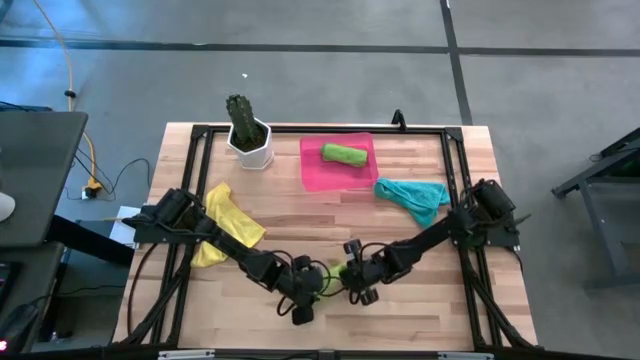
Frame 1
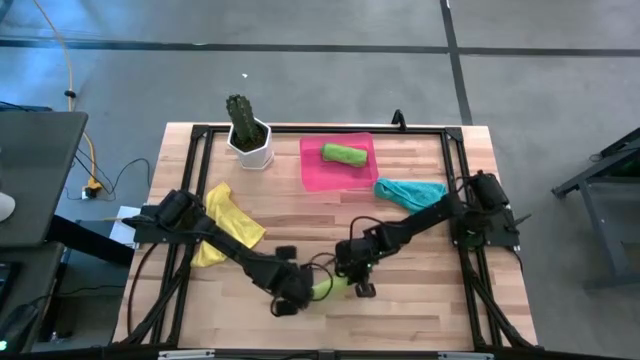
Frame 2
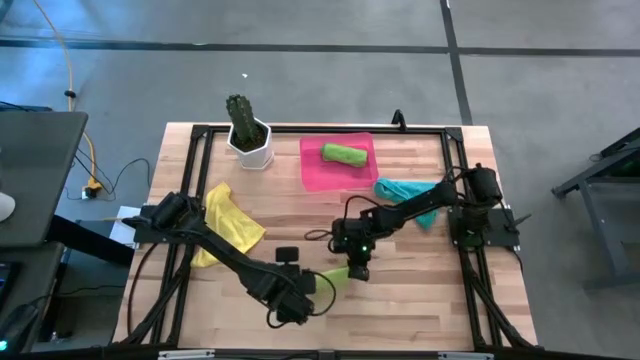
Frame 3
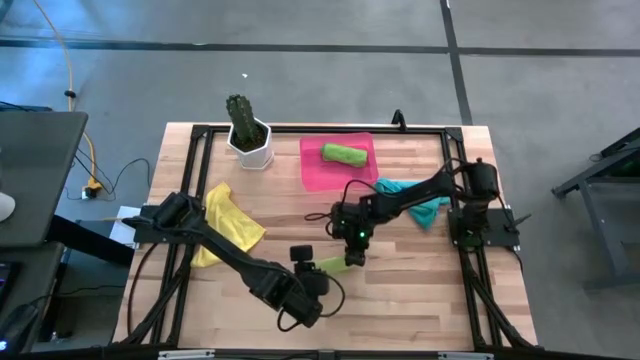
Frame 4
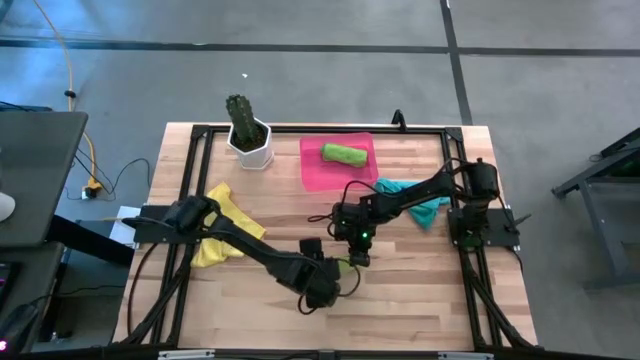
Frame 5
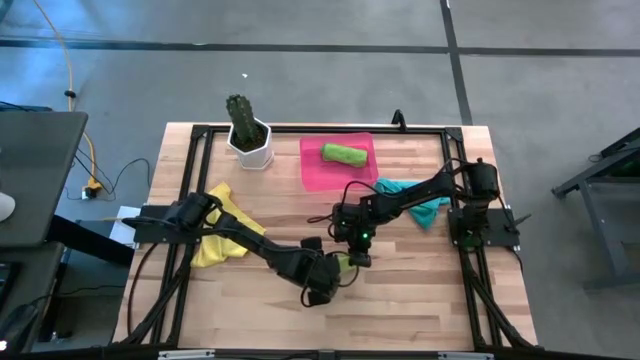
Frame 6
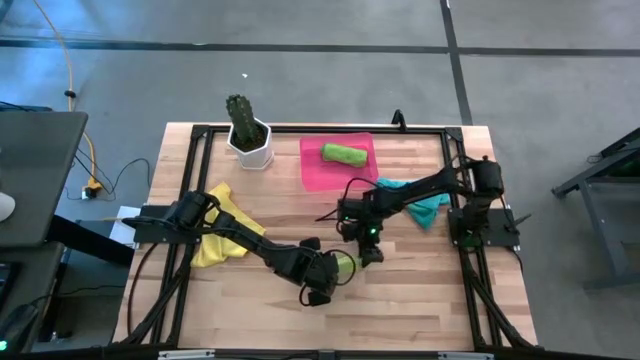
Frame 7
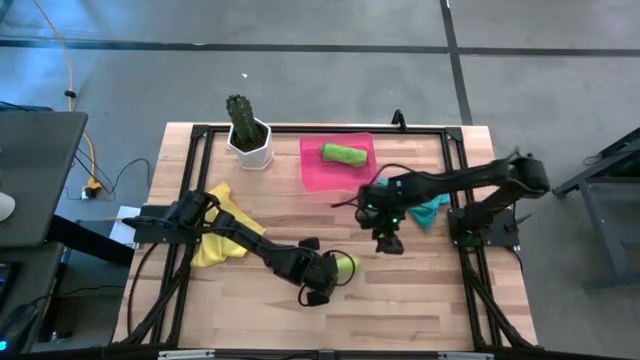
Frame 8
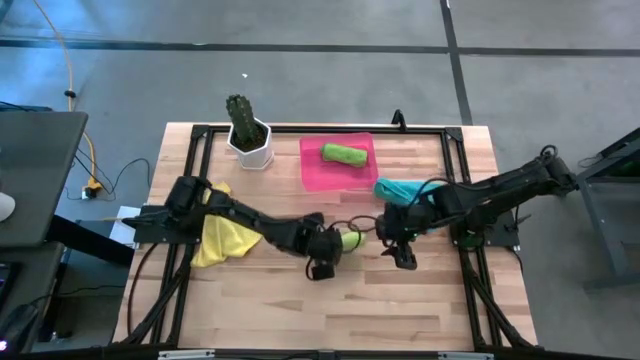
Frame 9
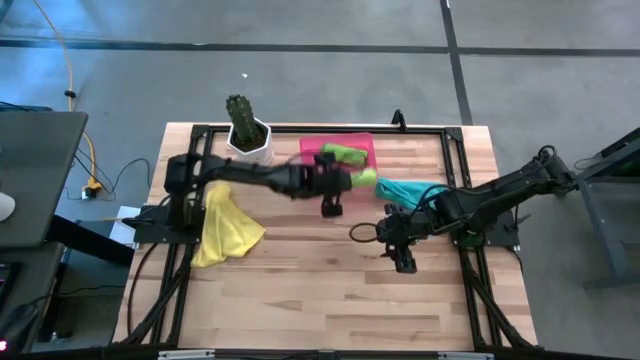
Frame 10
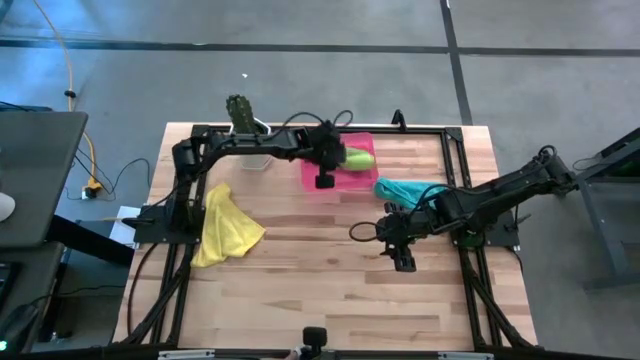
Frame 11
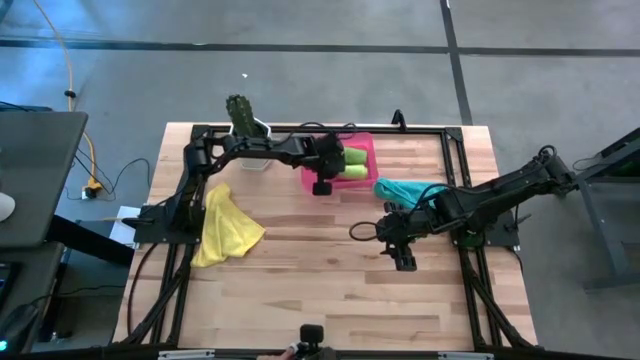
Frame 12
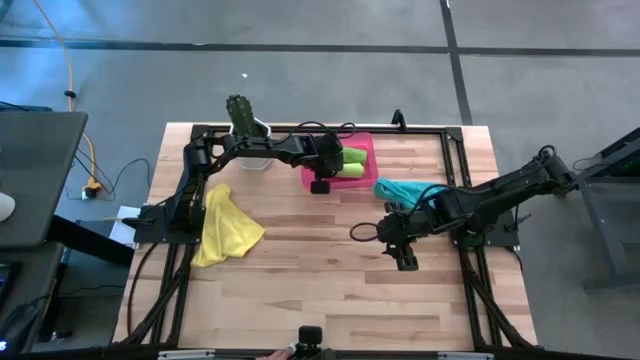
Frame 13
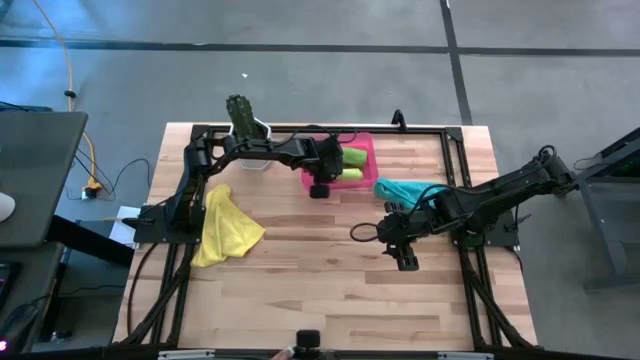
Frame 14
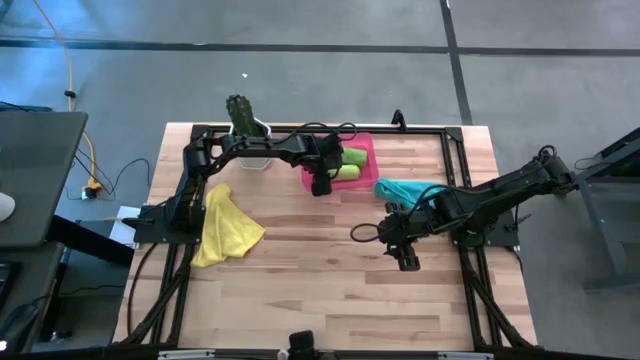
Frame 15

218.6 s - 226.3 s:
Task: Roll microfiber towels into tight, uniform cylinder then place into a basket
Put the rolled light green microfiber cloth into the pink bin

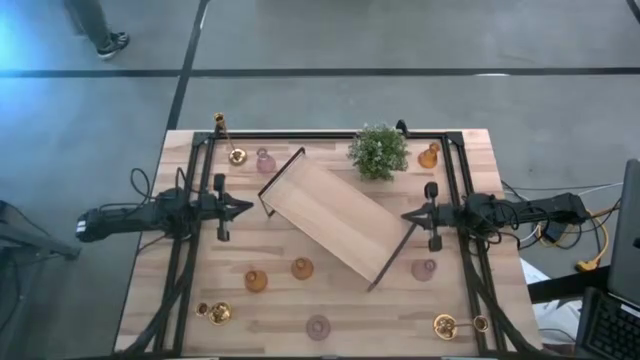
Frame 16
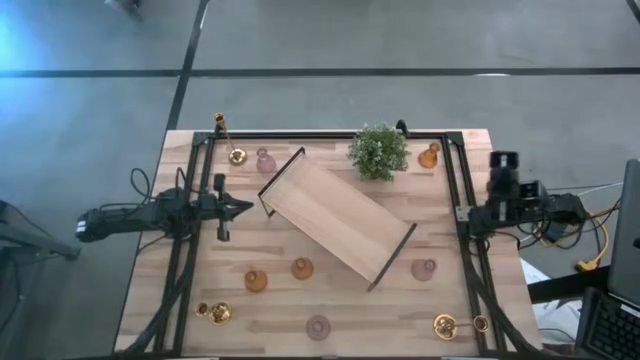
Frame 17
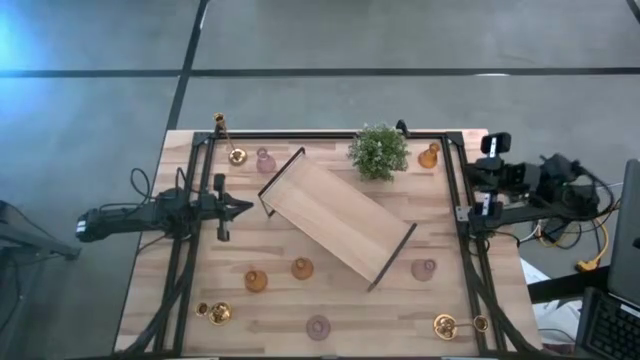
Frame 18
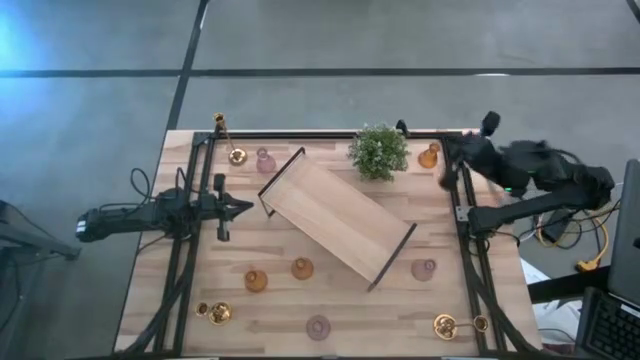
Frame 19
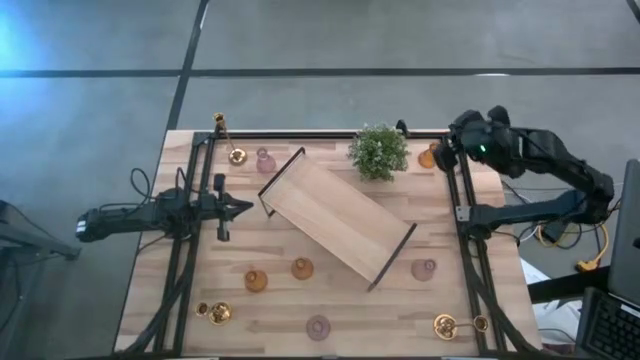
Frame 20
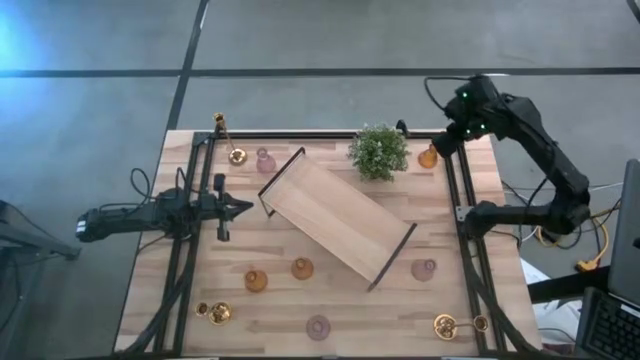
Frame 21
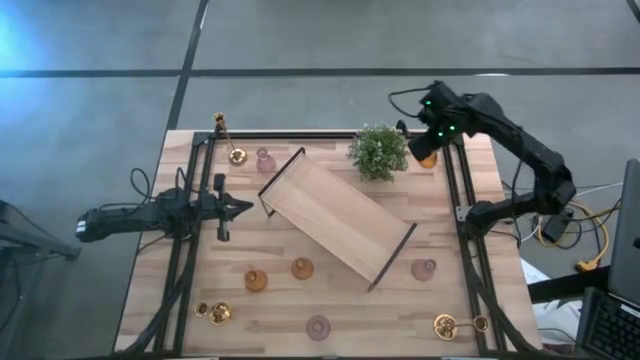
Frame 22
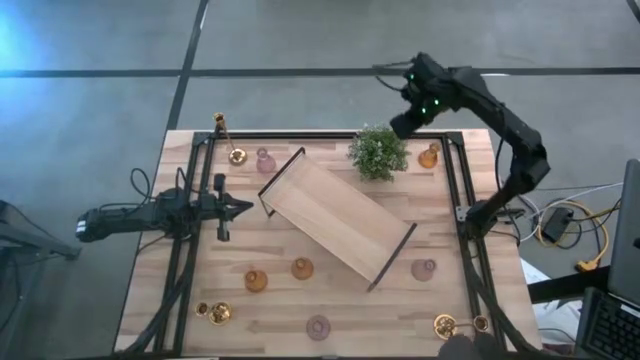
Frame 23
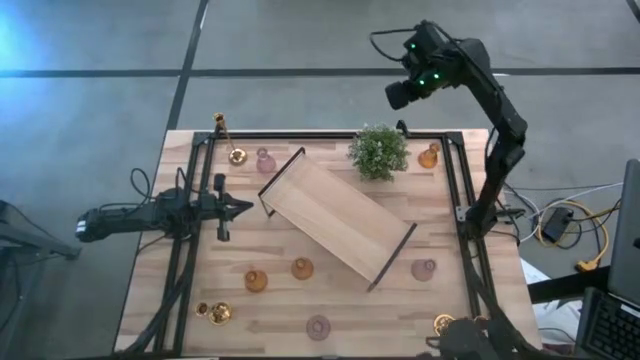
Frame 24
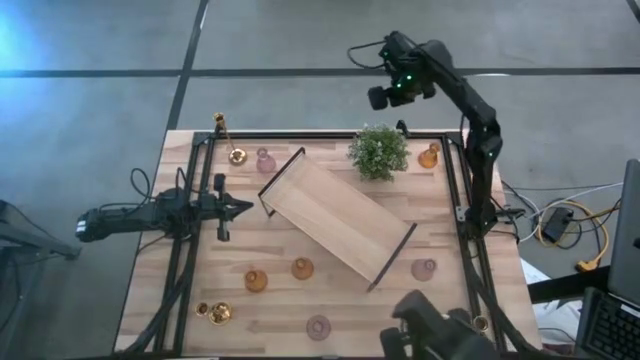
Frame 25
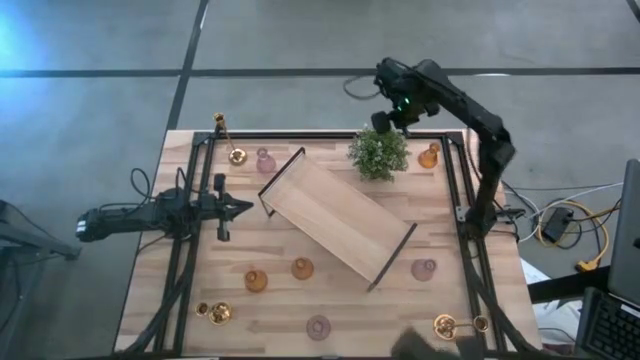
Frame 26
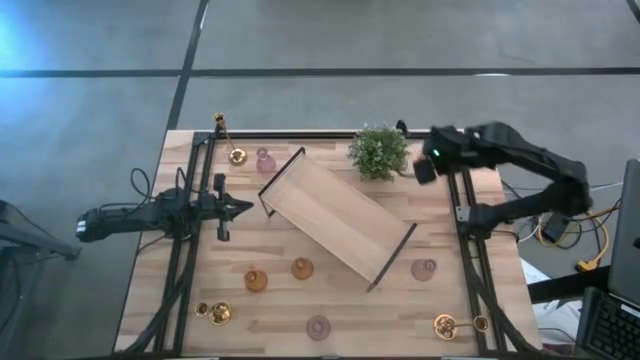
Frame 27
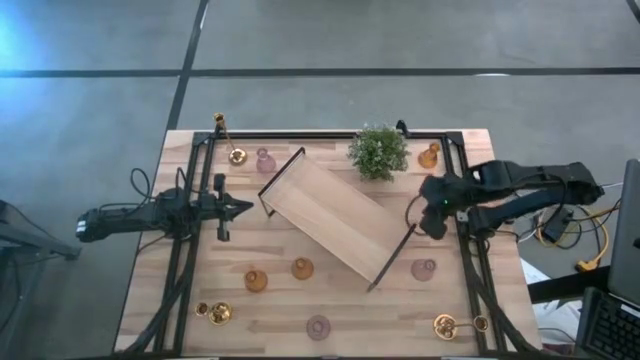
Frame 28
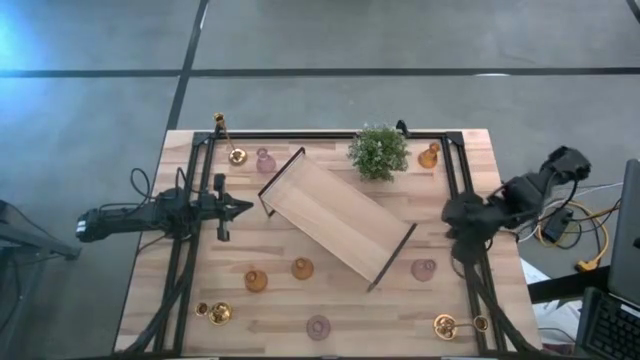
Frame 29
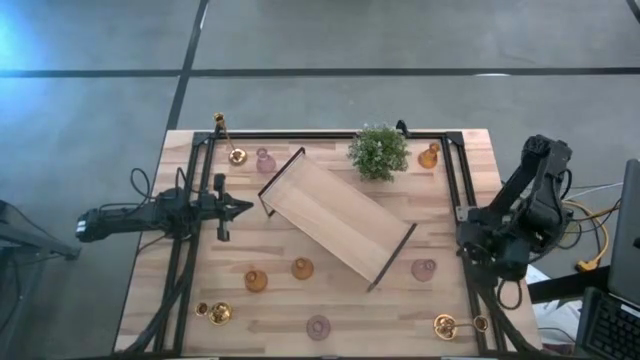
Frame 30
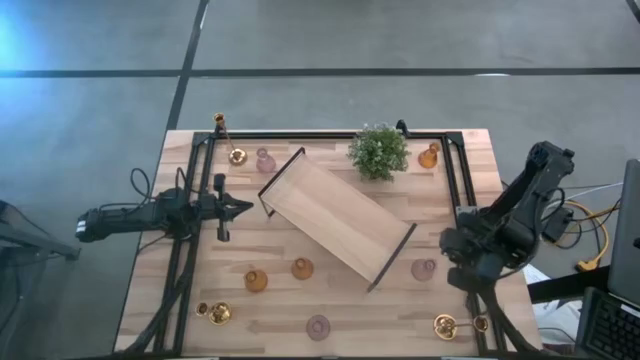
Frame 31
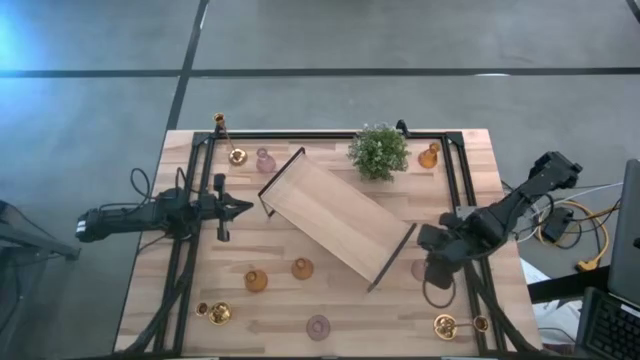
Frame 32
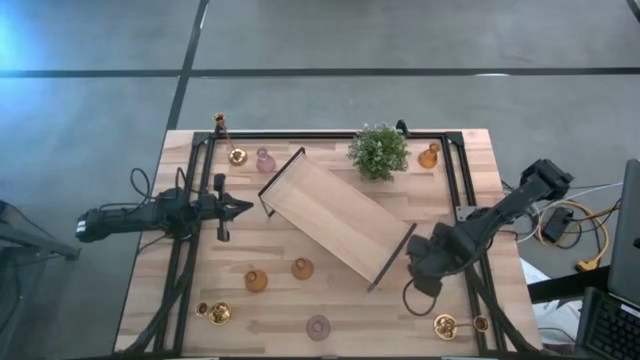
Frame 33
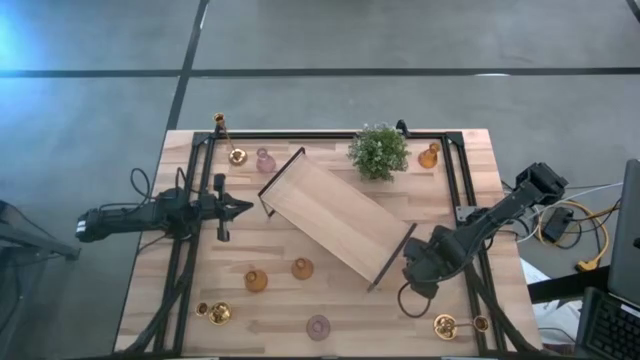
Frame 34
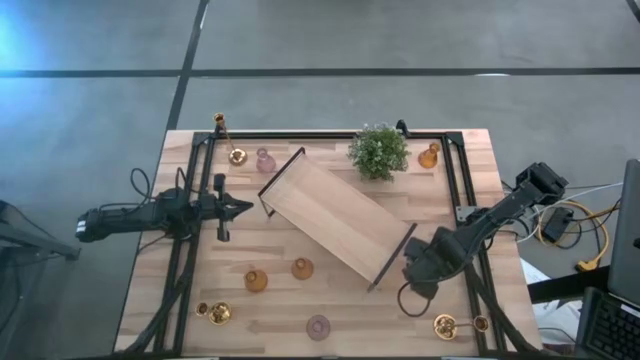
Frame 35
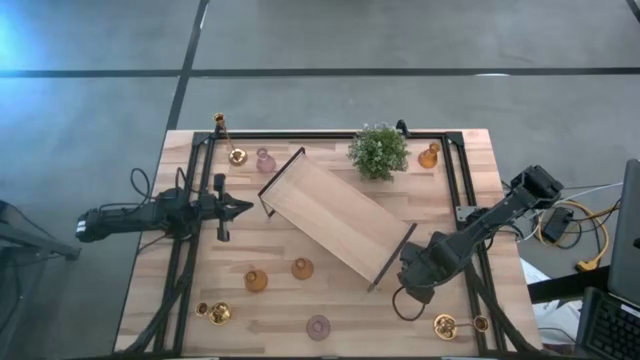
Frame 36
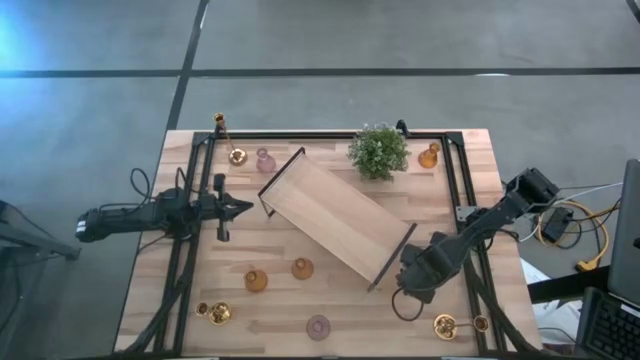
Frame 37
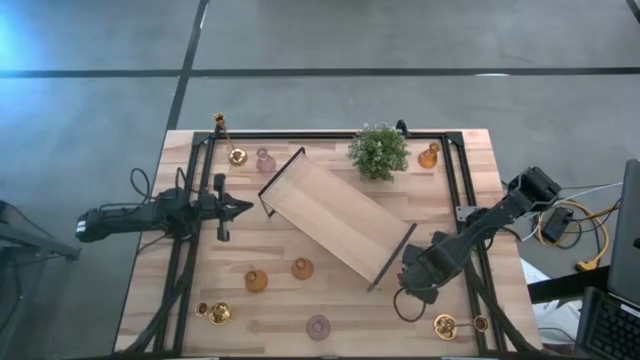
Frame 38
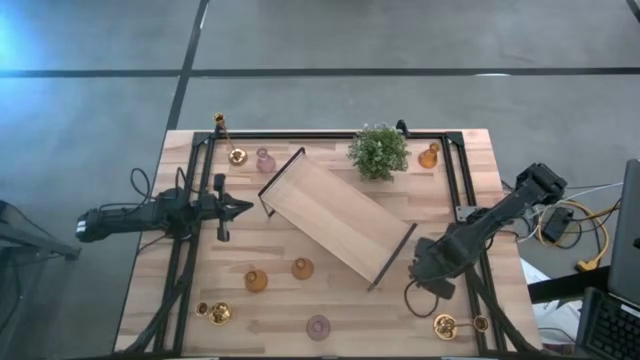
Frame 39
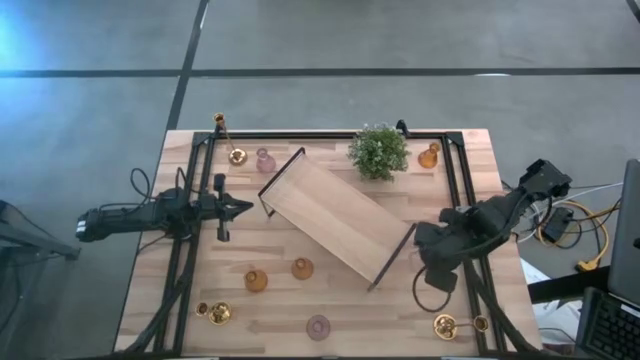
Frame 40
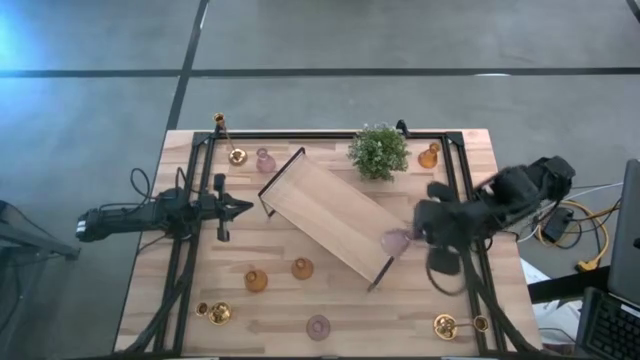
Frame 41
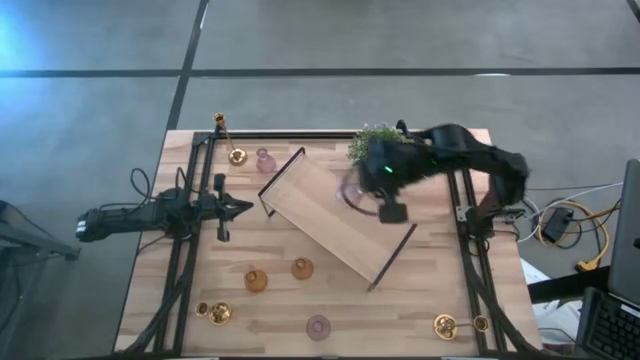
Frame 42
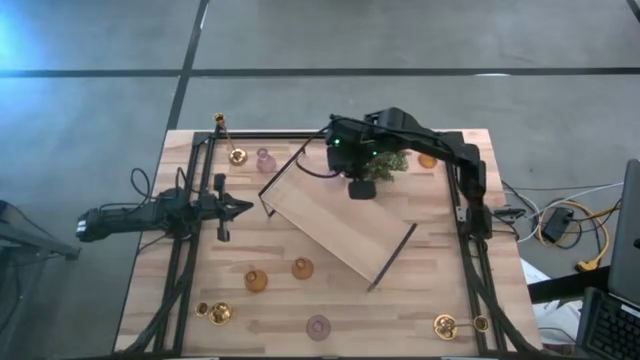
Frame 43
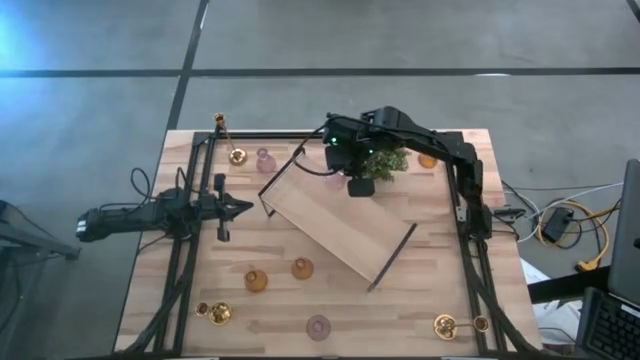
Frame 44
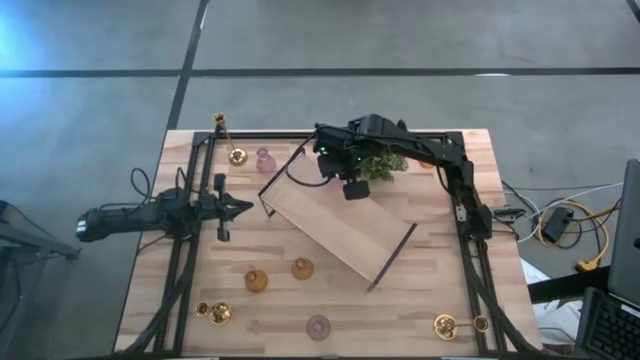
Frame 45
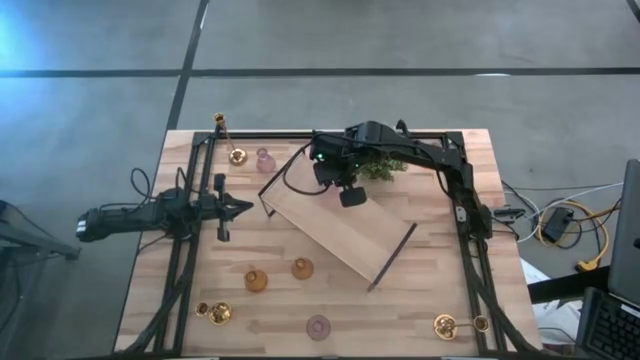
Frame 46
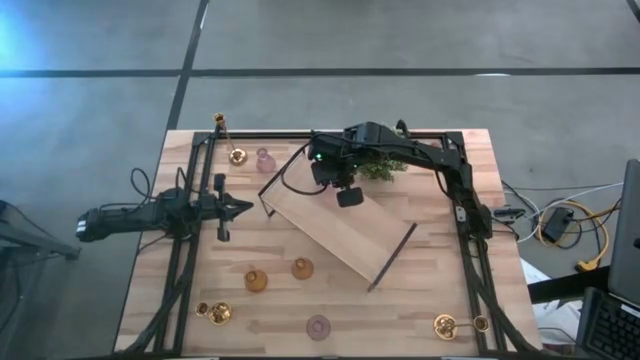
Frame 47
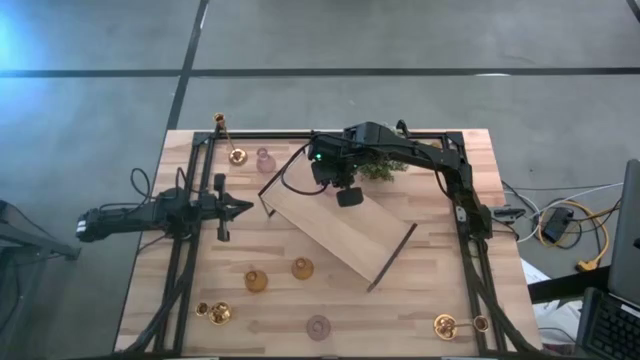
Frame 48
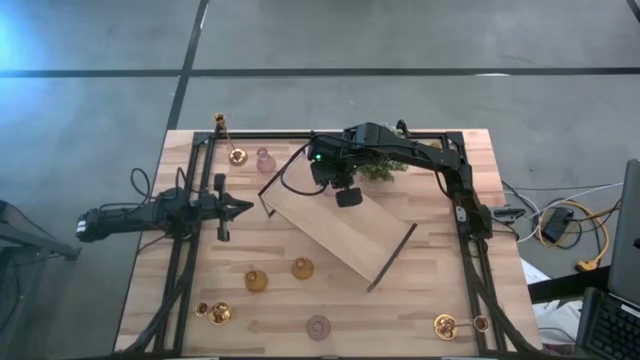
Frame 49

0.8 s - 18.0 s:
Task: Pick & Place candle stick holders
Put the light pink glass candle holder on the shelf
